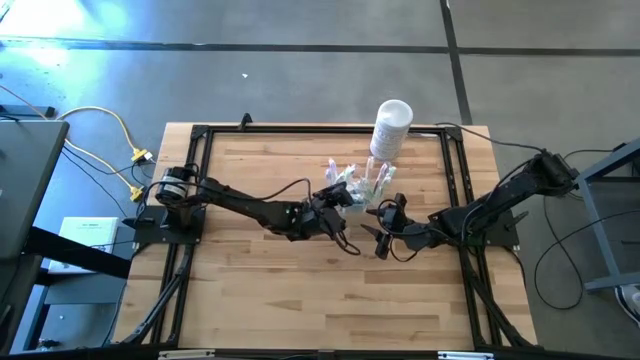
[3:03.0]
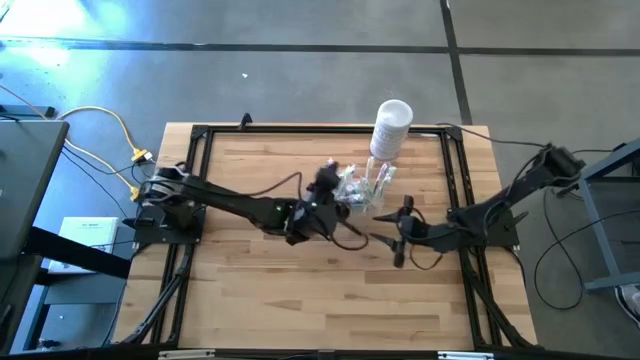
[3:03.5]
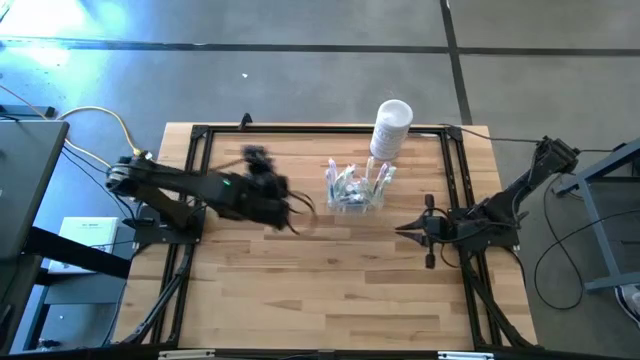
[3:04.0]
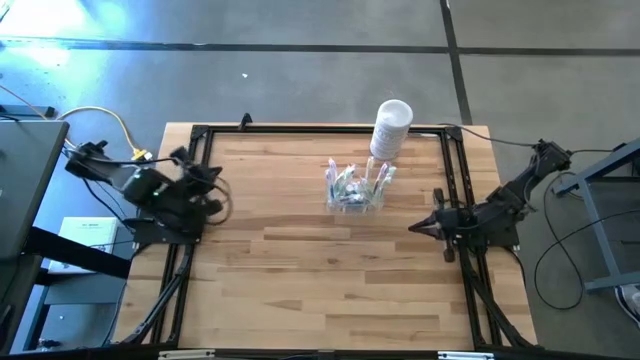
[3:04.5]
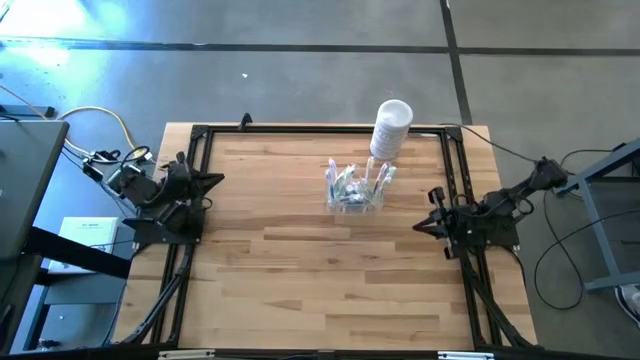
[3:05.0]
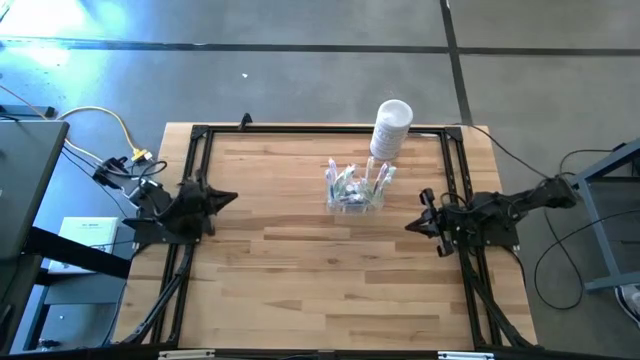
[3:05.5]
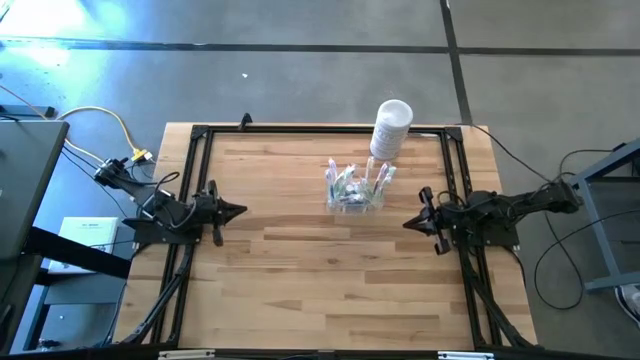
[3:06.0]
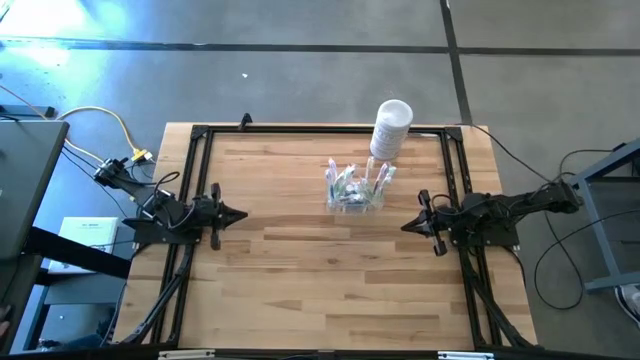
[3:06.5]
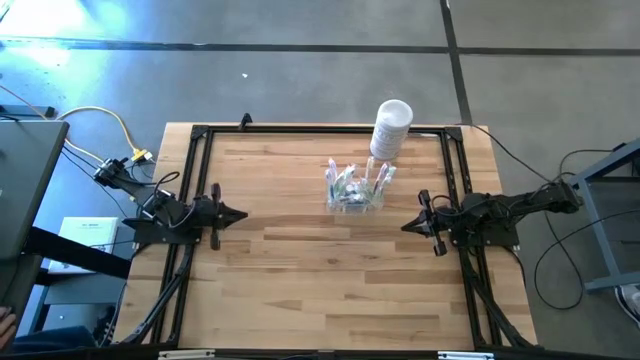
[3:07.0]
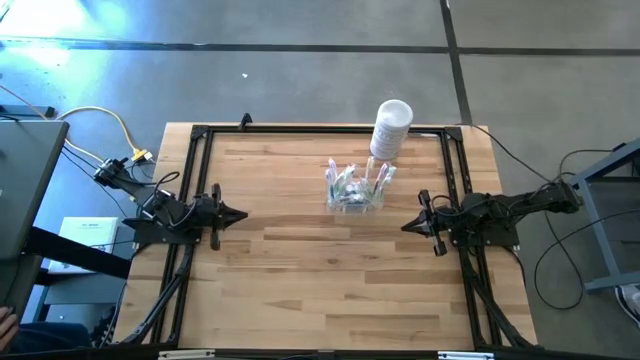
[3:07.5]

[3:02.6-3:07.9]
Task: Pick & Place toothbrushing station
Return to Home Position

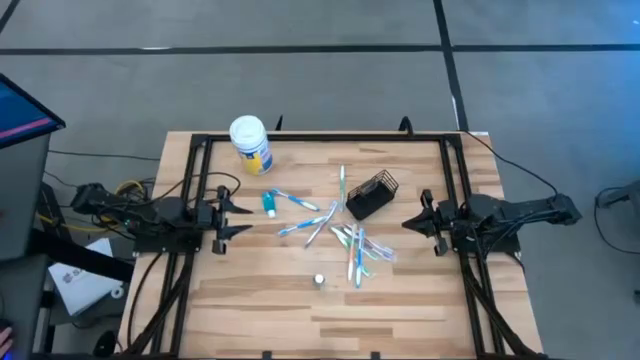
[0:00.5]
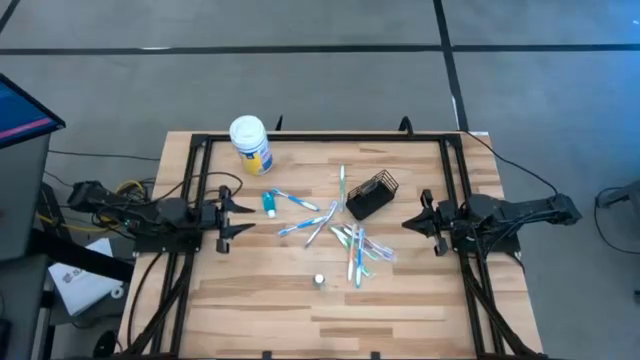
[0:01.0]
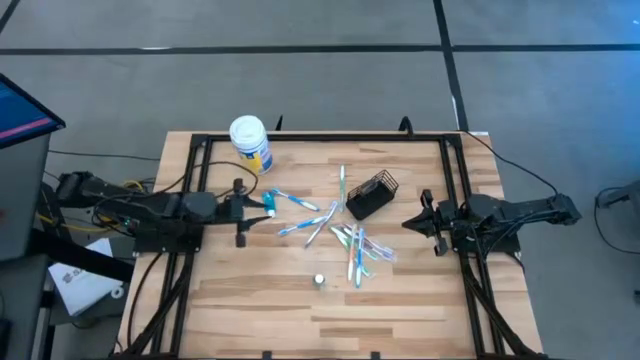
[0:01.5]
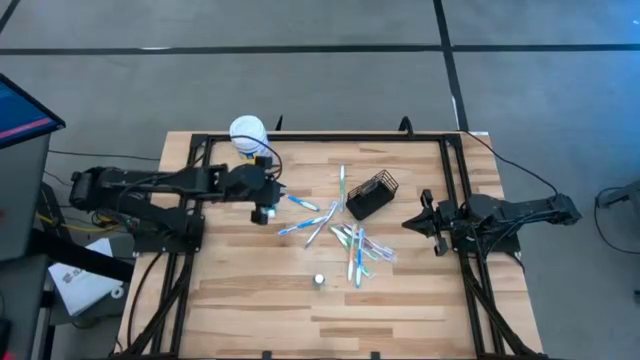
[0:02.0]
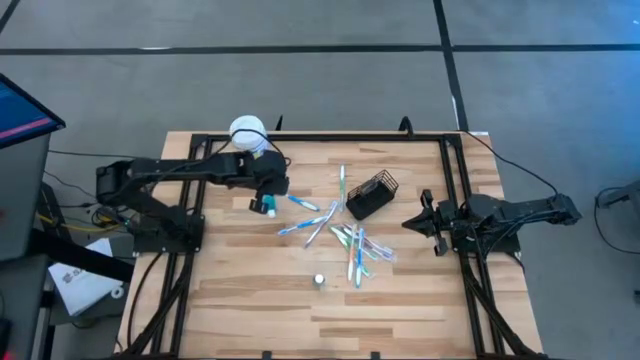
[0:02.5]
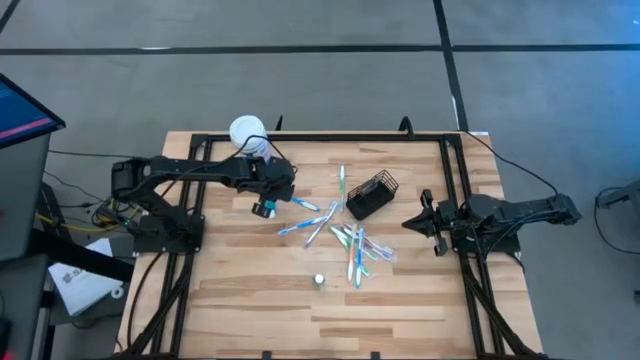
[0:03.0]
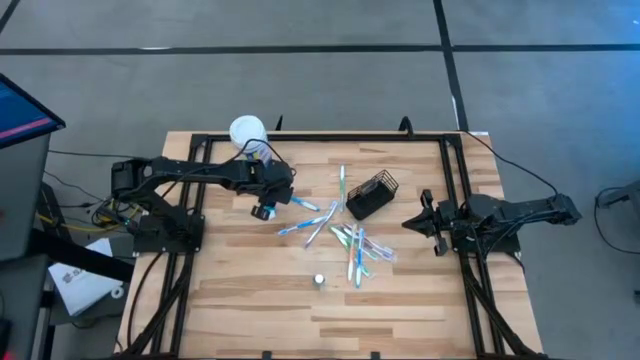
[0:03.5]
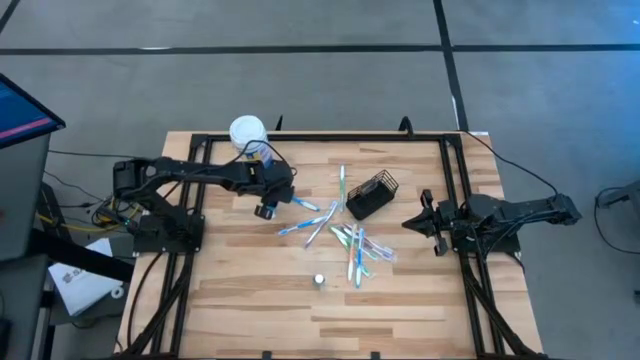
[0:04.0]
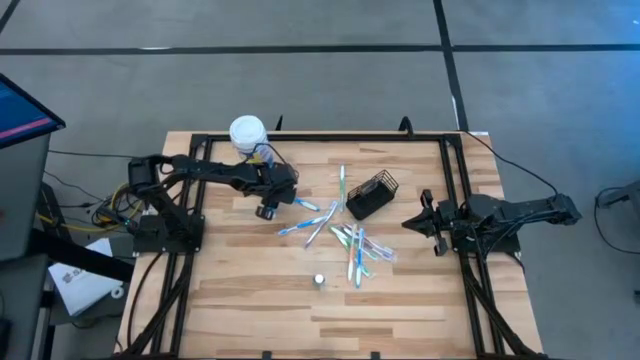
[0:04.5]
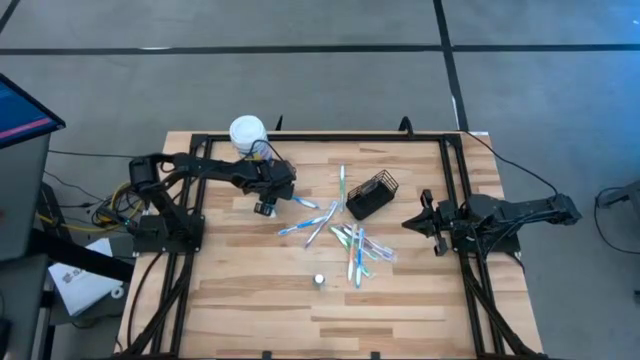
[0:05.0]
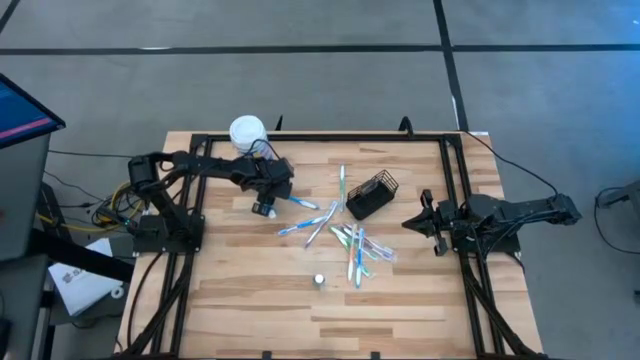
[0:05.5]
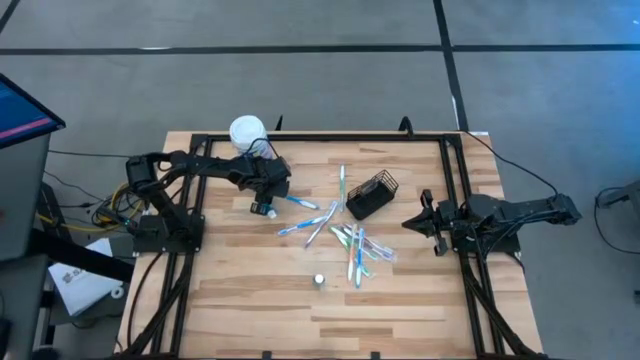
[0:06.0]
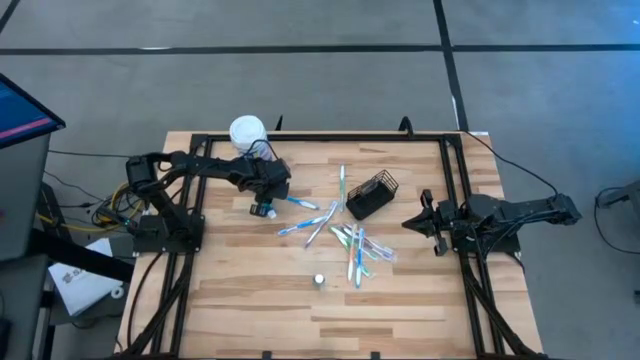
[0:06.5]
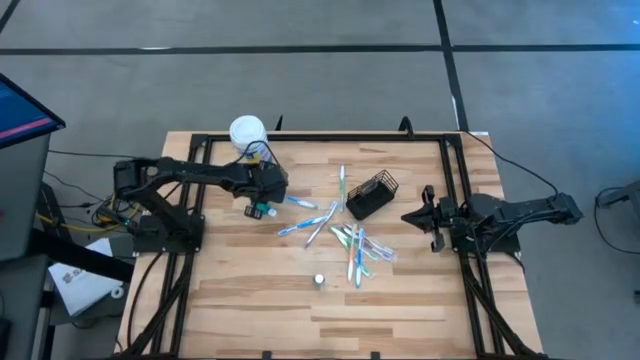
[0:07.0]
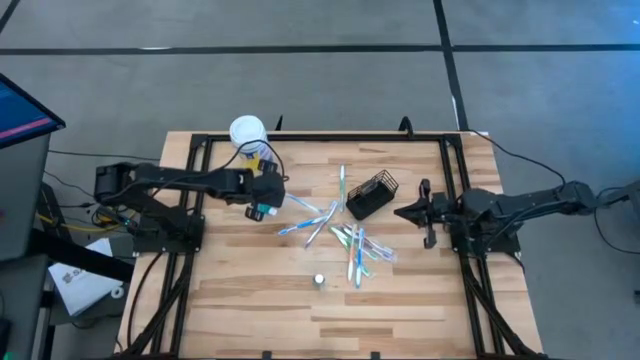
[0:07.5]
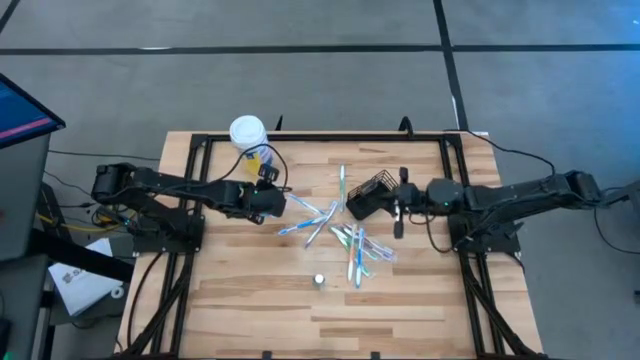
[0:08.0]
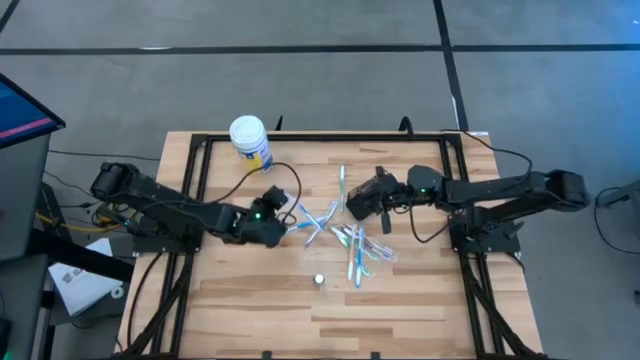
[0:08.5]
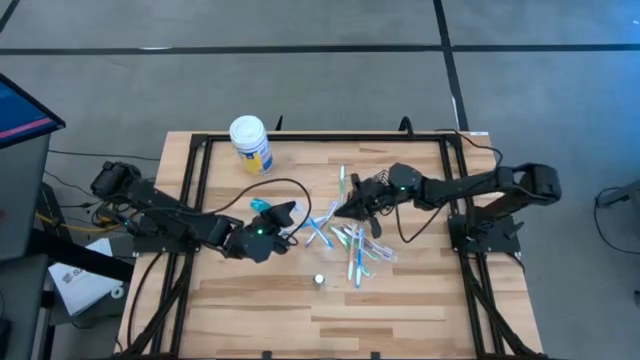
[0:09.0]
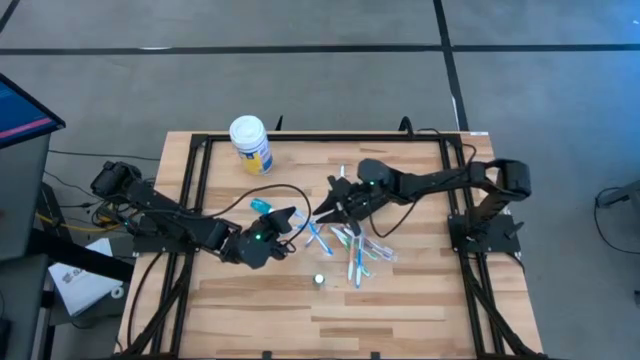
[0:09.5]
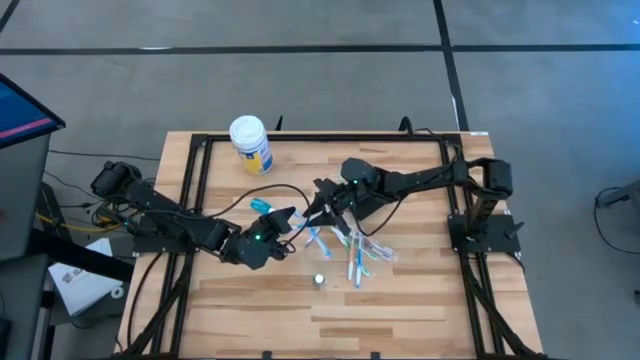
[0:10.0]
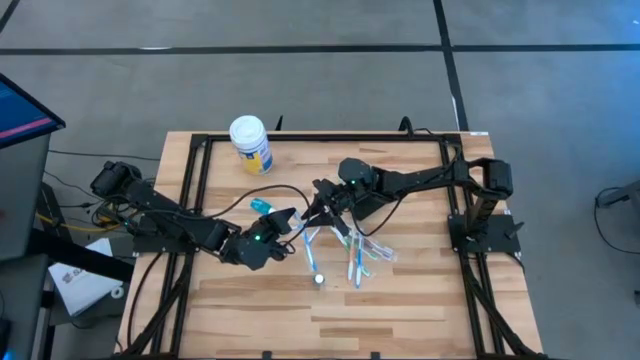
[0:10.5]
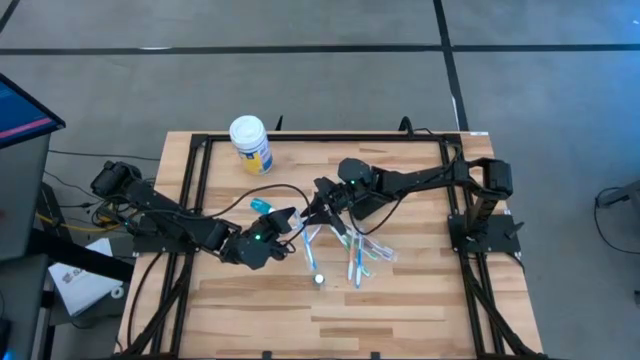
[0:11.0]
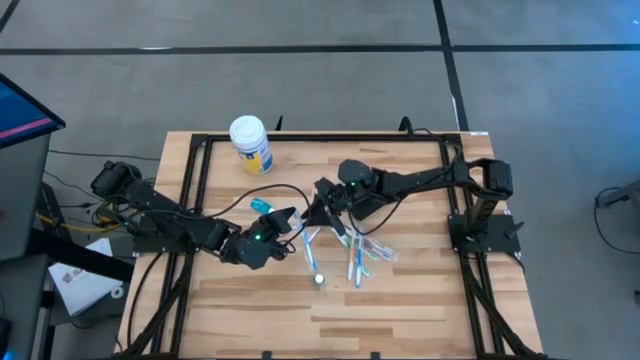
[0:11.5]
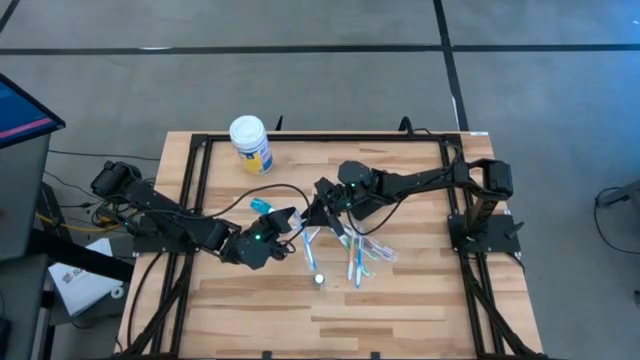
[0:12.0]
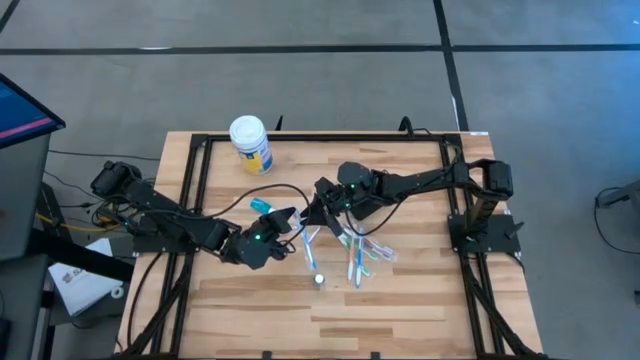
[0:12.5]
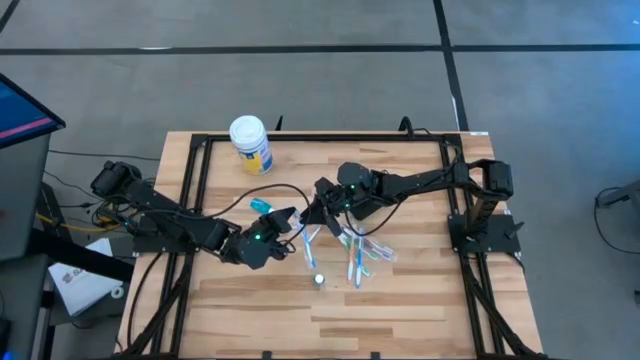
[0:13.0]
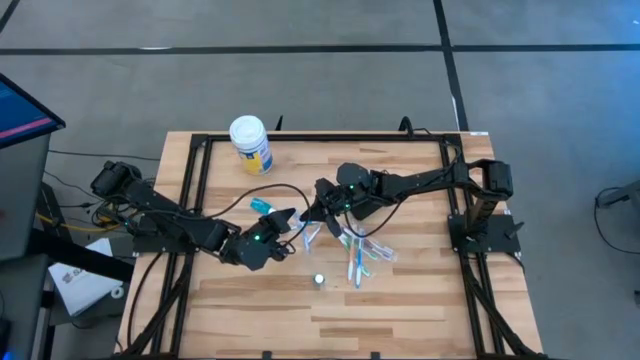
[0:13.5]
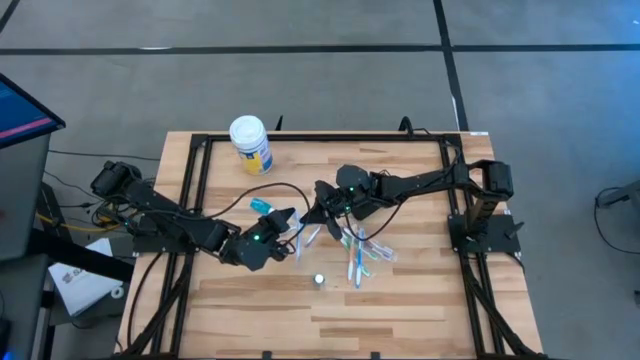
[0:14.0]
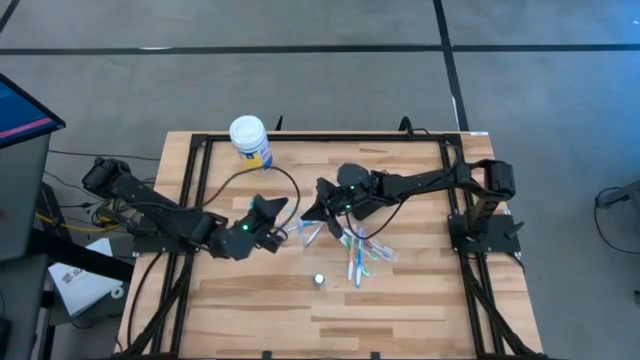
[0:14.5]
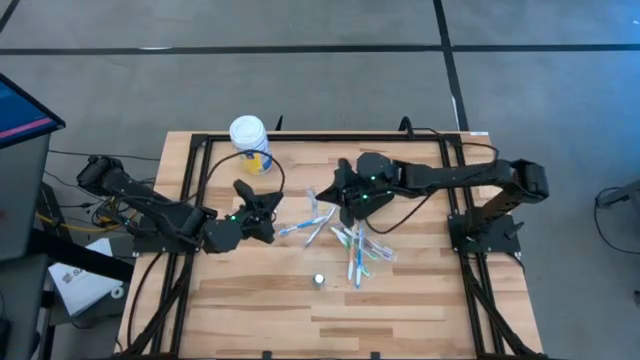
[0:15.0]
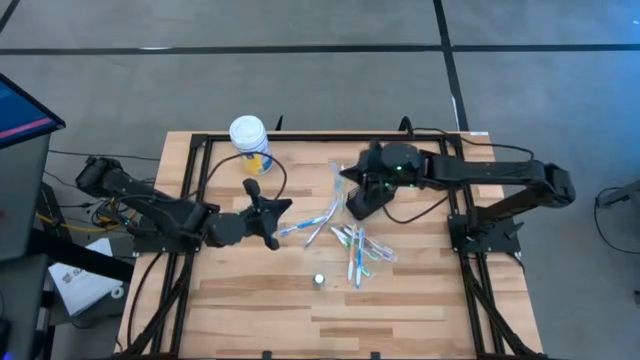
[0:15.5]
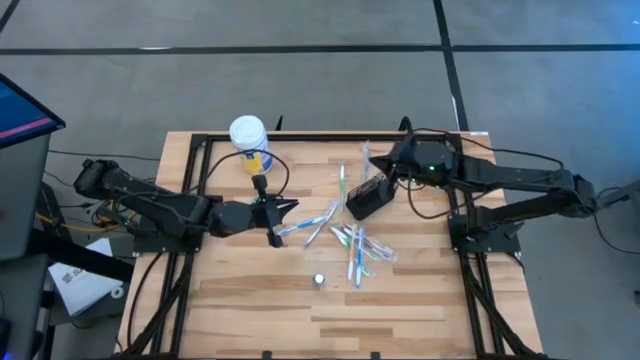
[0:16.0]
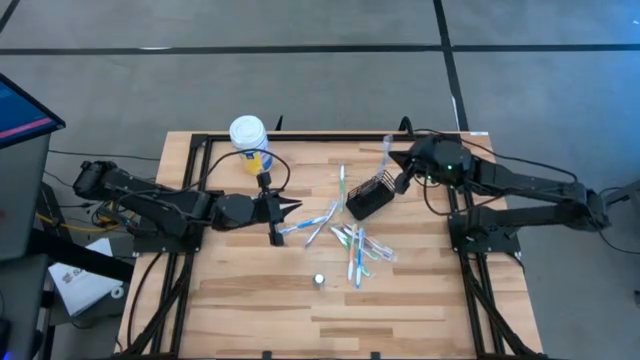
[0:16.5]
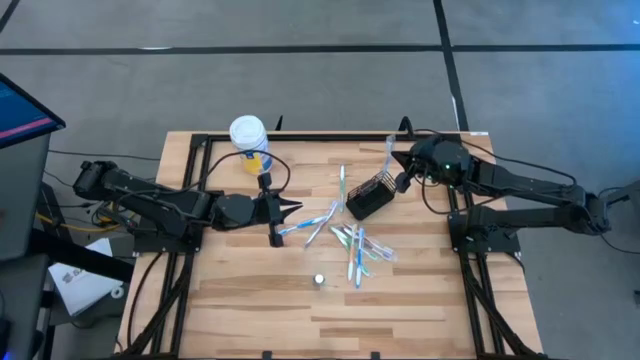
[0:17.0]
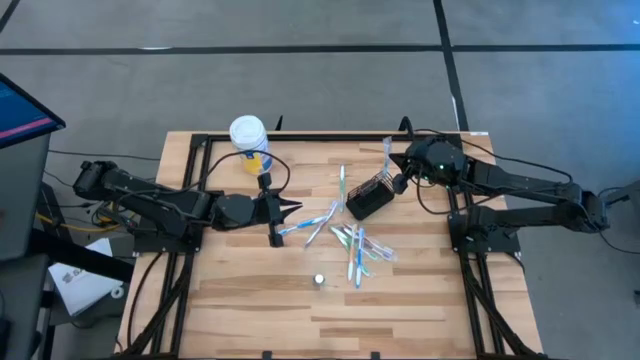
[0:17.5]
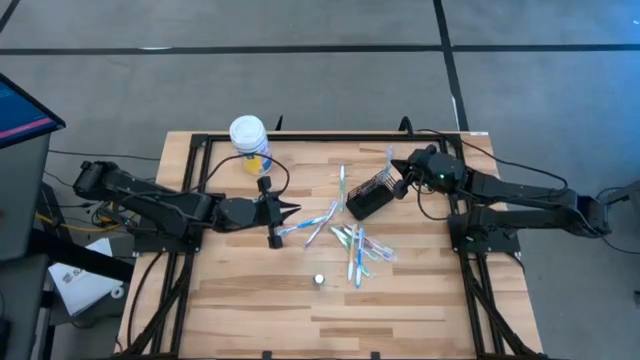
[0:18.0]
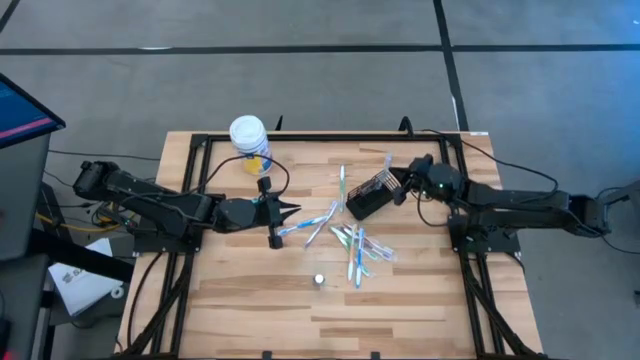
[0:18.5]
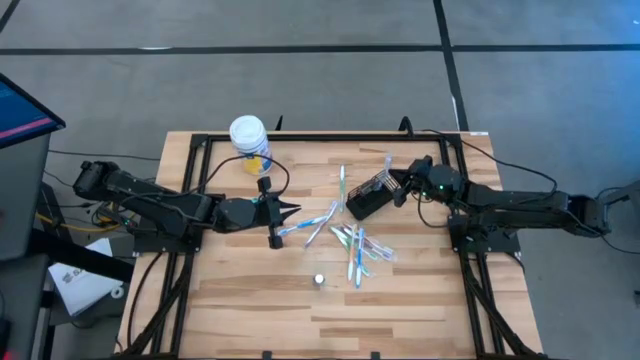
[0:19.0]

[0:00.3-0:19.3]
Task: Pick & Place toothbrushing station
Put the blue toothbrush into the mesh organizer
